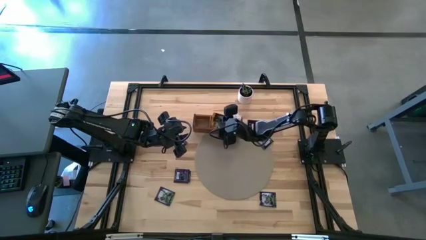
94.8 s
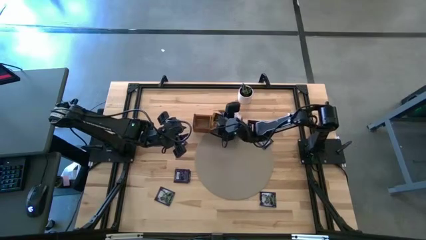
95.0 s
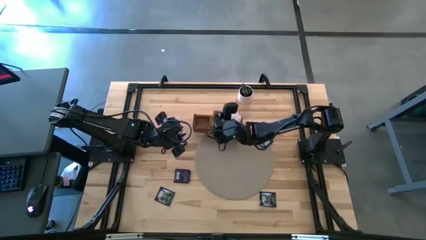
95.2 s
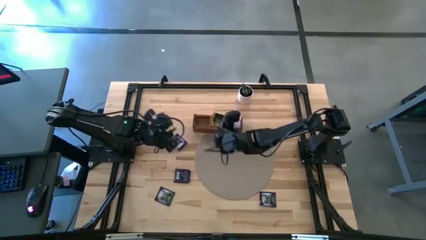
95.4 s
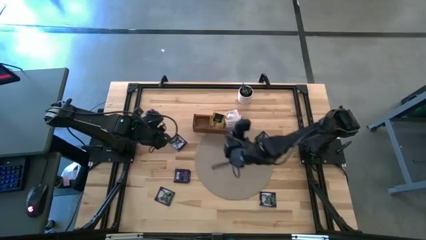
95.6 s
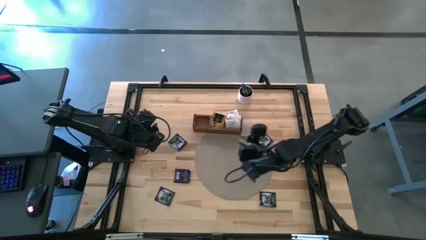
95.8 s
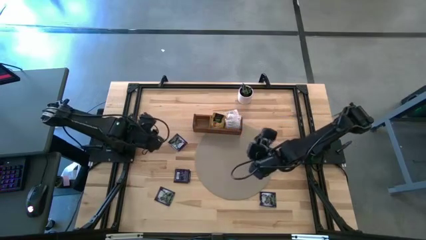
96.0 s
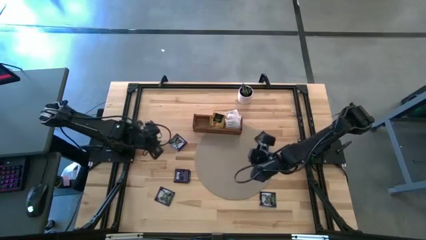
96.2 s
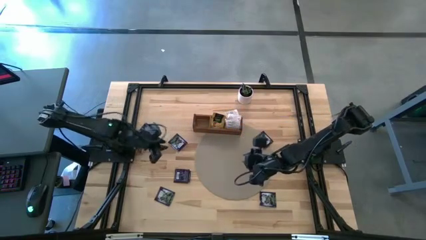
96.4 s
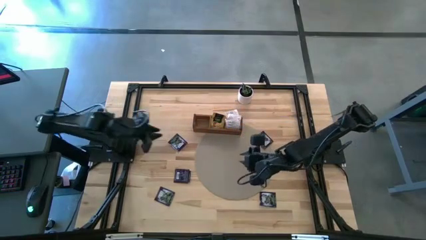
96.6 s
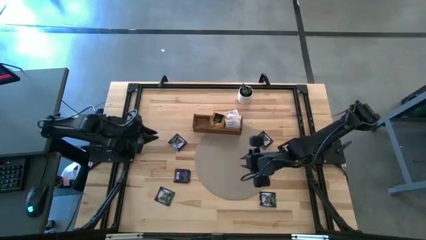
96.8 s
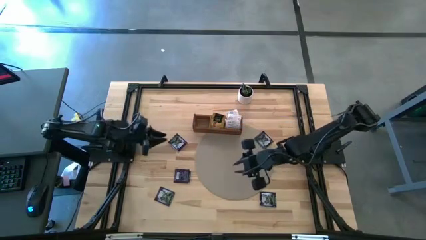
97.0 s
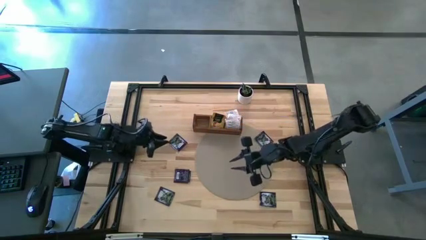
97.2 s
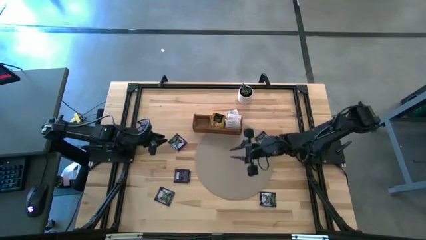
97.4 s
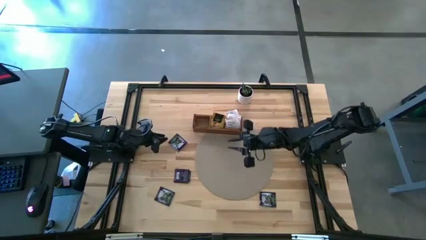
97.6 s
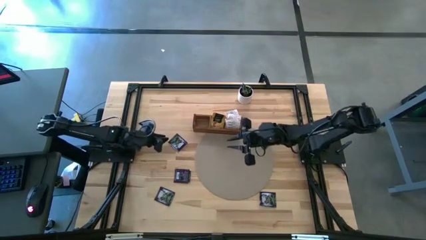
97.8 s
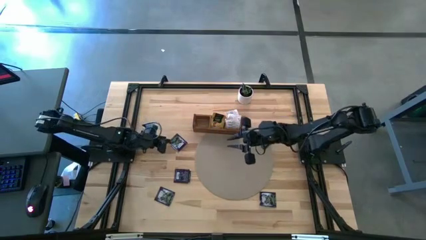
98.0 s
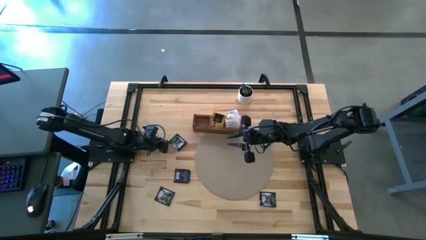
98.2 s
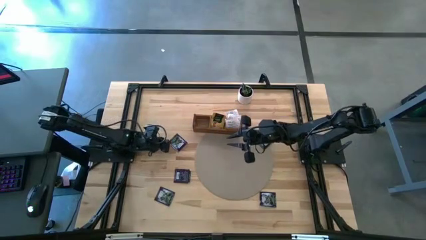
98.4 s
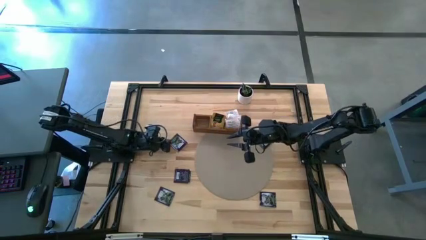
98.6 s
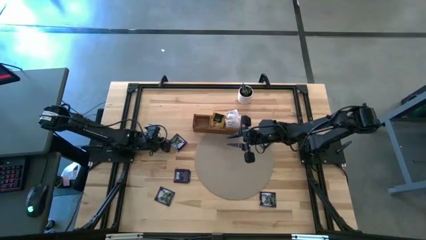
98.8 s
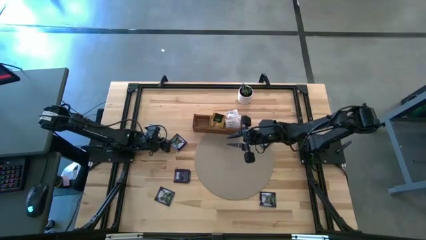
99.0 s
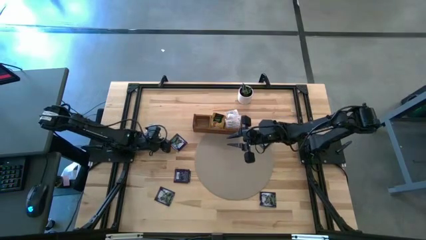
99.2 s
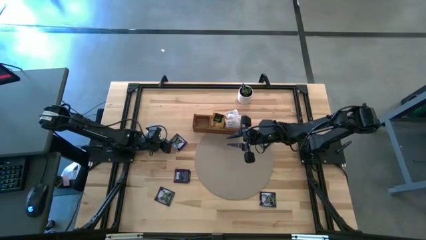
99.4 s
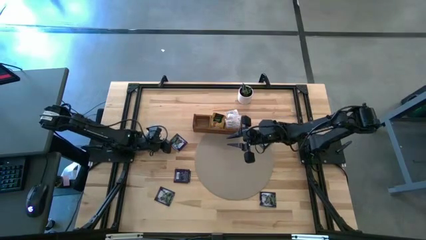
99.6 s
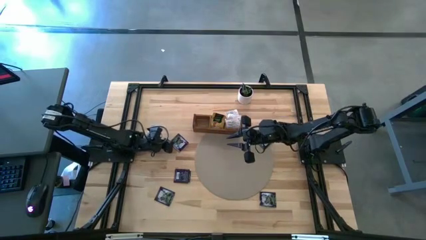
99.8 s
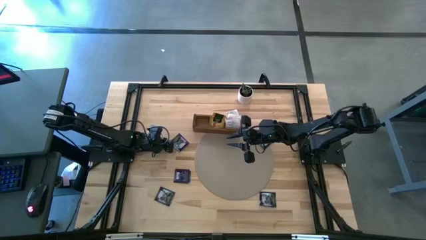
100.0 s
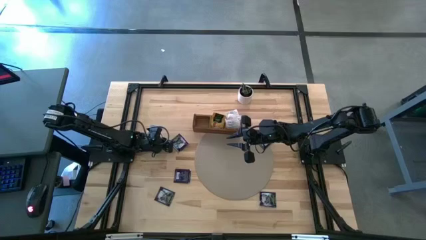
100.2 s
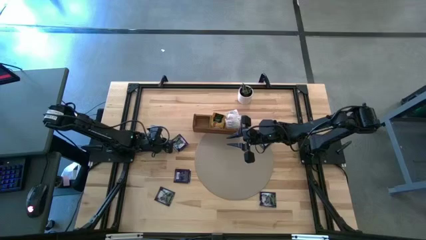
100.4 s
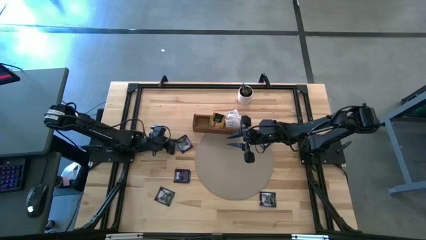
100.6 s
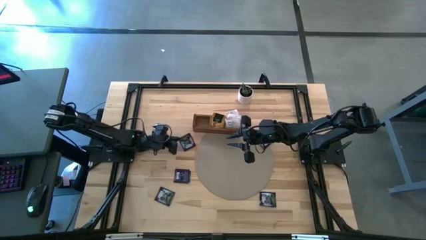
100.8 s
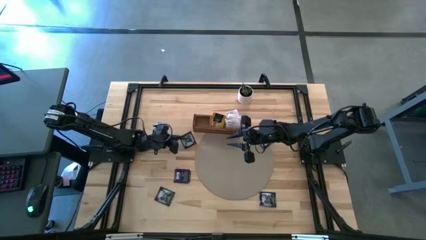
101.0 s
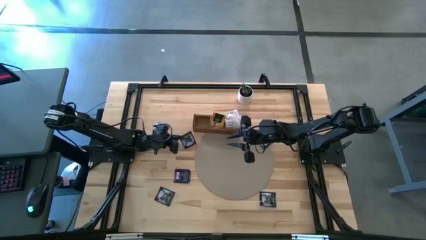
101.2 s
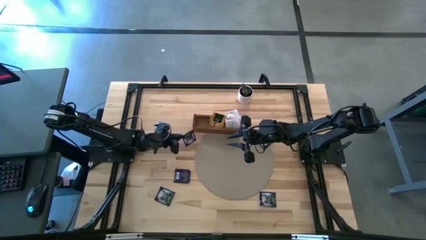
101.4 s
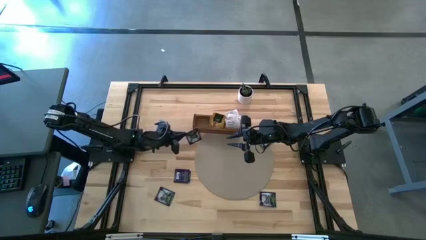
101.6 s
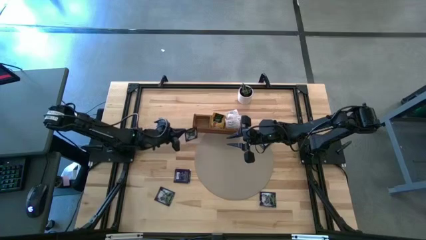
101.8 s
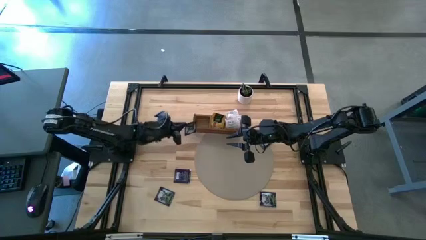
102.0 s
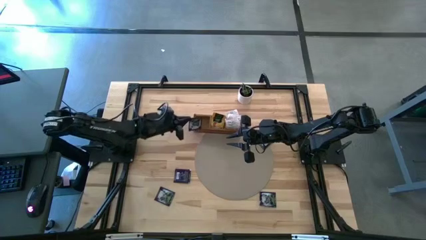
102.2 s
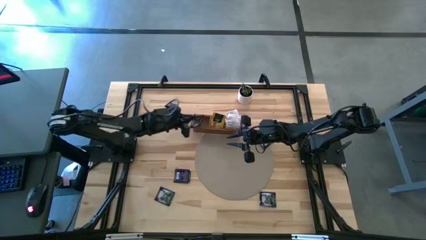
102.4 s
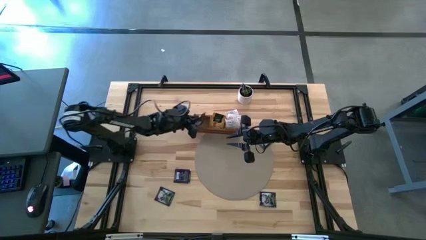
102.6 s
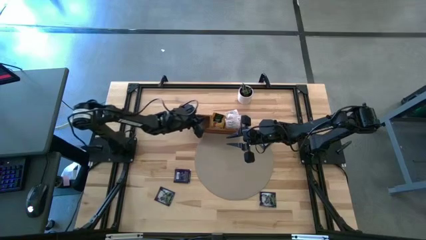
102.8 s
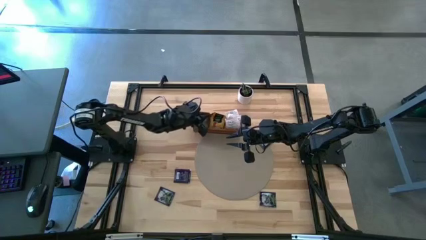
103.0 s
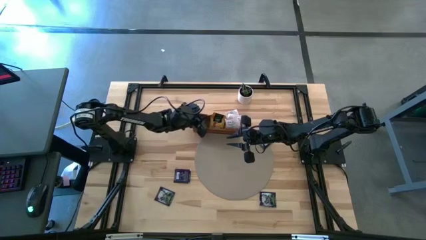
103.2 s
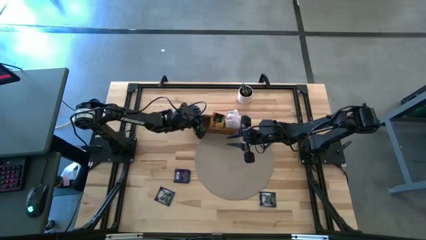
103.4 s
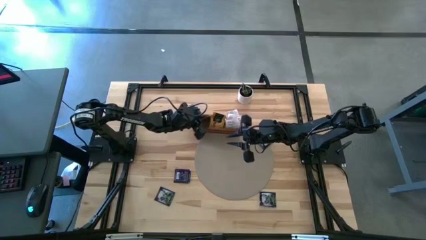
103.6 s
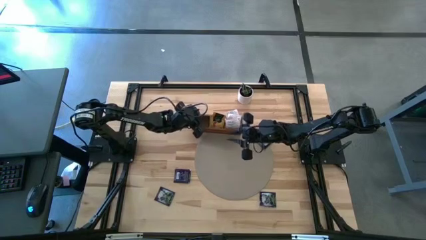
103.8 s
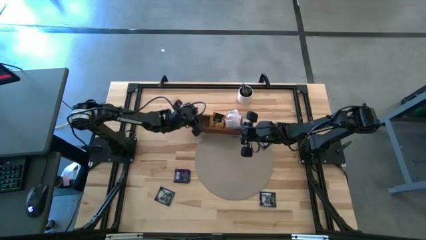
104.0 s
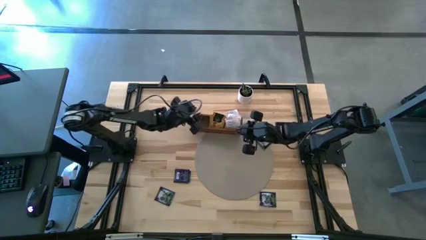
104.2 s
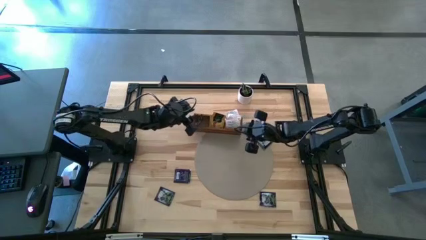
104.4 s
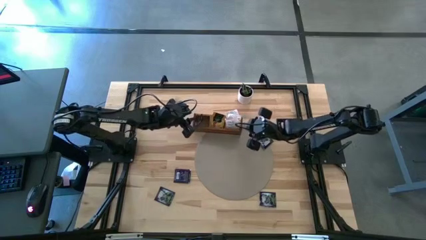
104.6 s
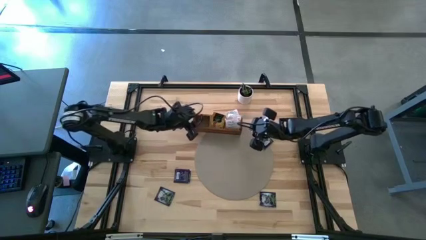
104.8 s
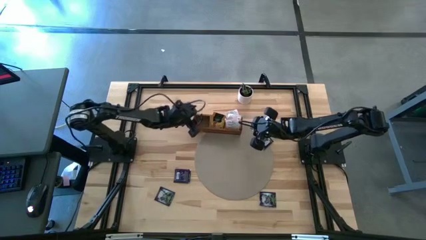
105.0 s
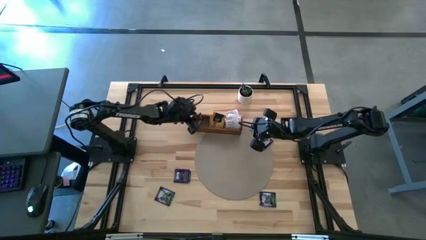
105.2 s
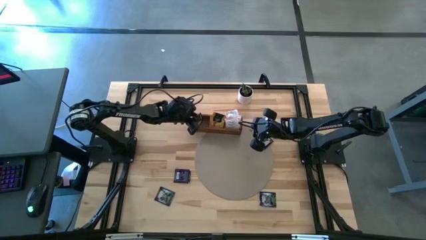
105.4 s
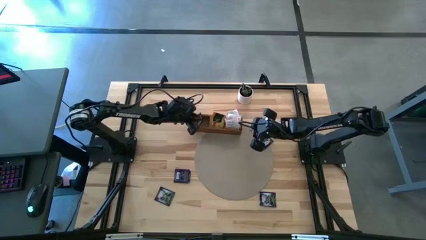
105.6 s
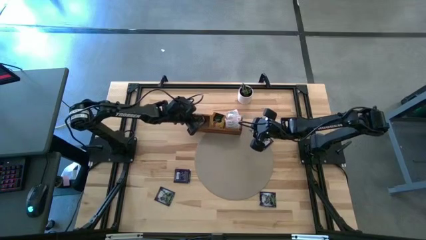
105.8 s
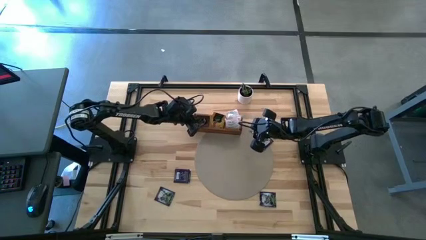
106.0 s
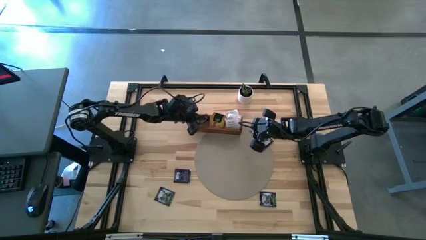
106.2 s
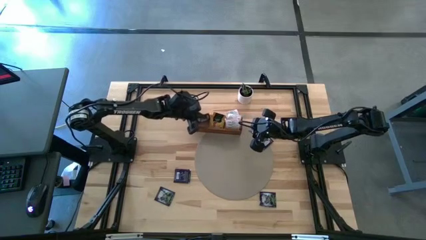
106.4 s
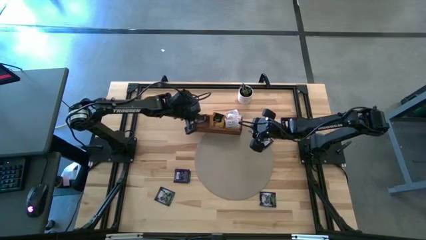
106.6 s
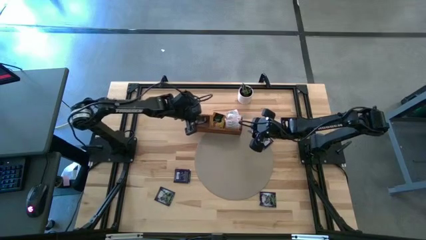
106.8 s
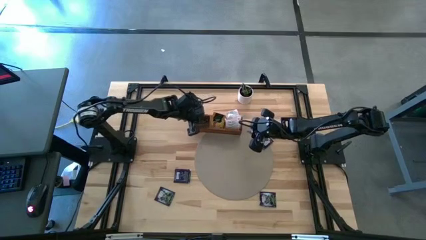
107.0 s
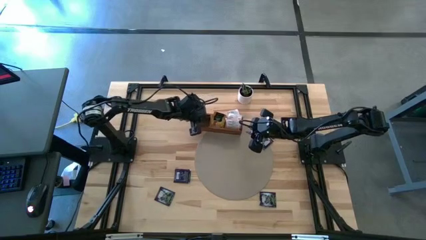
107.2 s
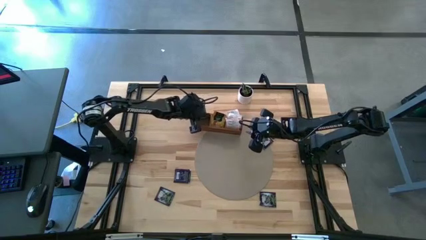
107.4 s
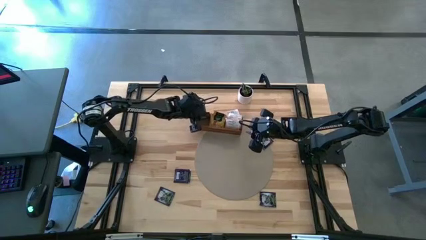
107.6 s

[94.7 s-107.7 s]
Task: Pick & Place Tea
Put the dark blue tea bag into the left section of the wooden organizer

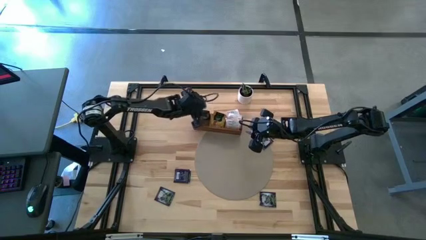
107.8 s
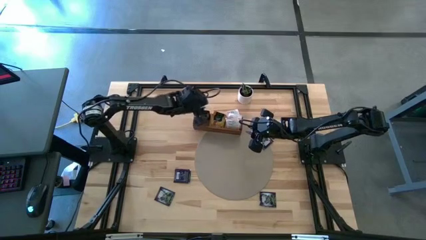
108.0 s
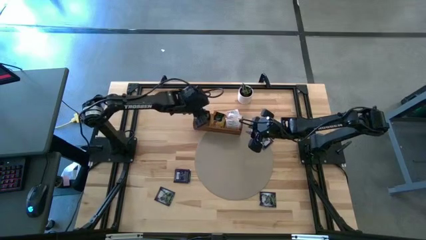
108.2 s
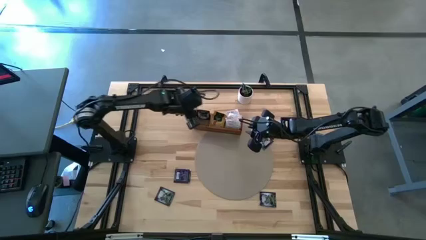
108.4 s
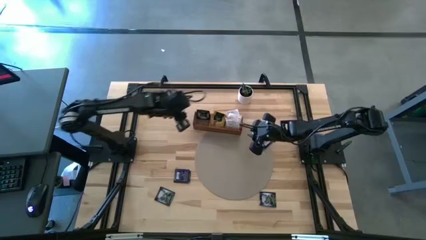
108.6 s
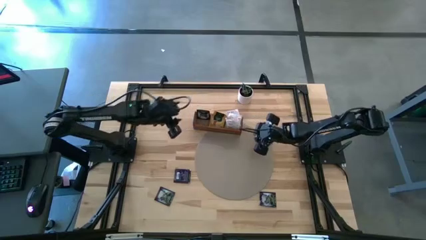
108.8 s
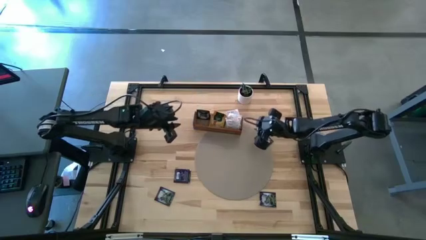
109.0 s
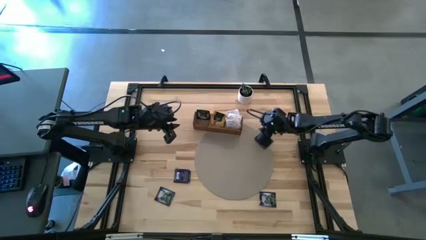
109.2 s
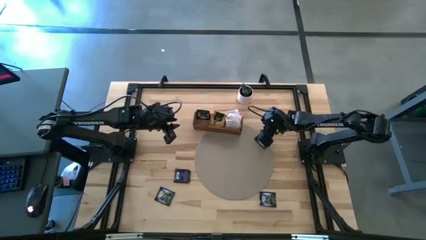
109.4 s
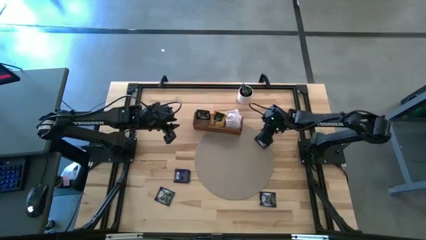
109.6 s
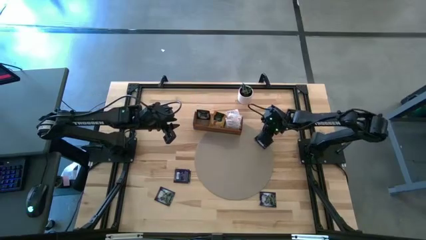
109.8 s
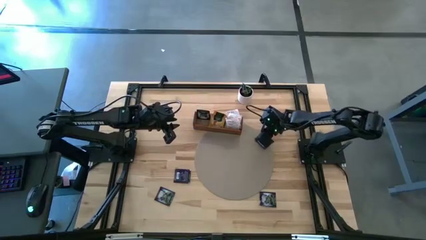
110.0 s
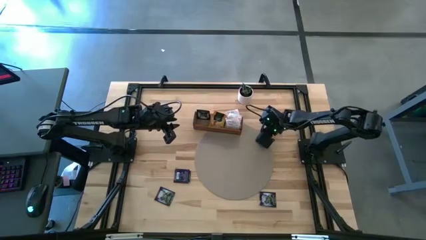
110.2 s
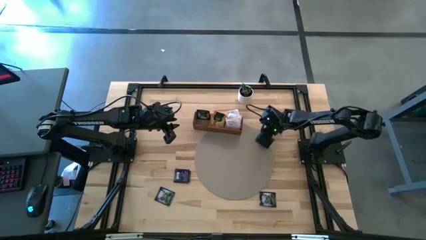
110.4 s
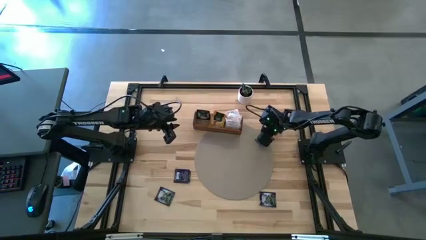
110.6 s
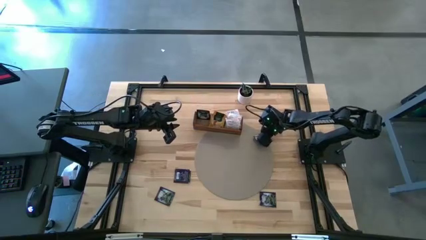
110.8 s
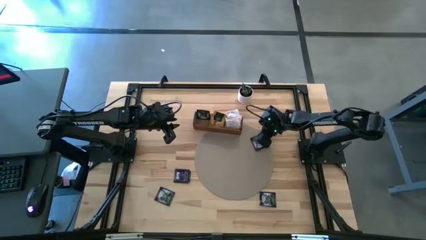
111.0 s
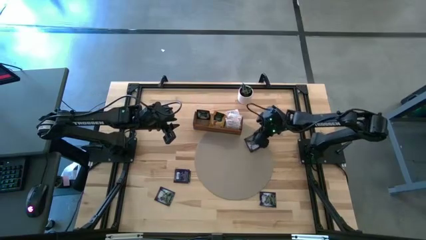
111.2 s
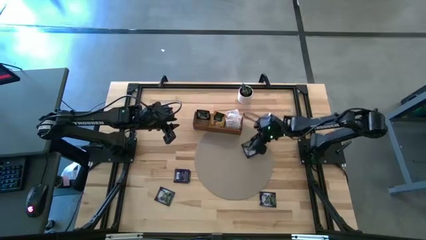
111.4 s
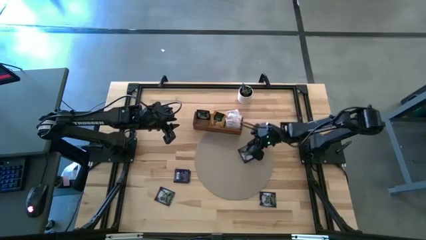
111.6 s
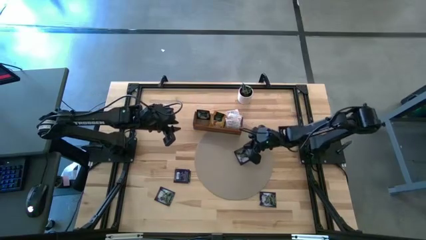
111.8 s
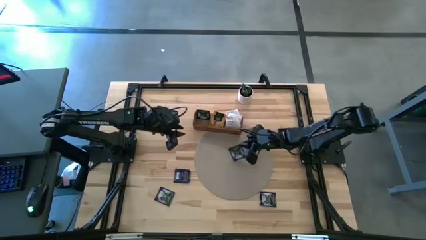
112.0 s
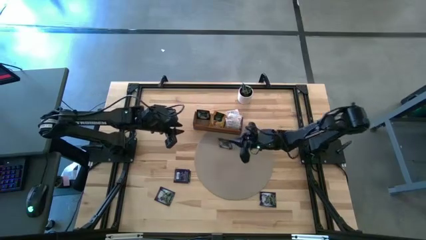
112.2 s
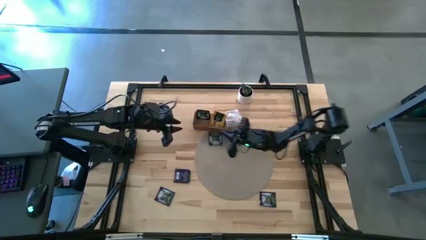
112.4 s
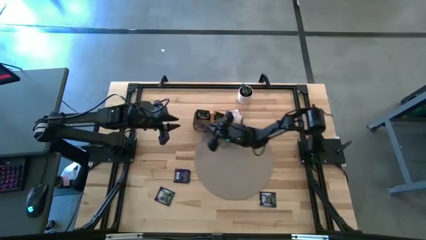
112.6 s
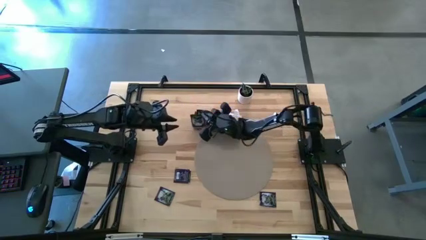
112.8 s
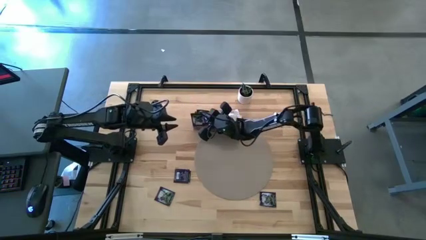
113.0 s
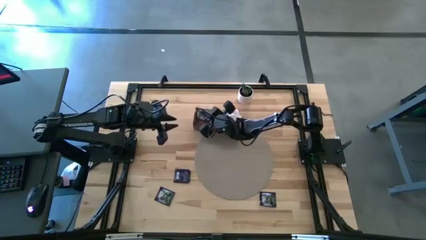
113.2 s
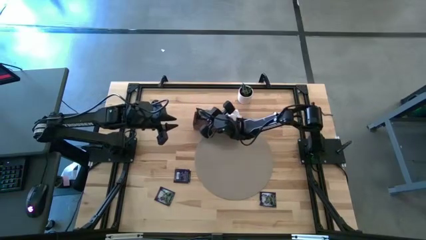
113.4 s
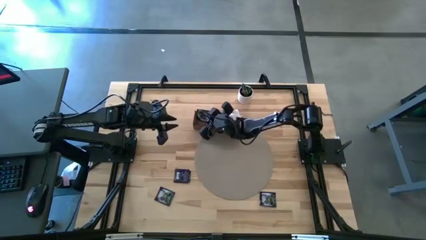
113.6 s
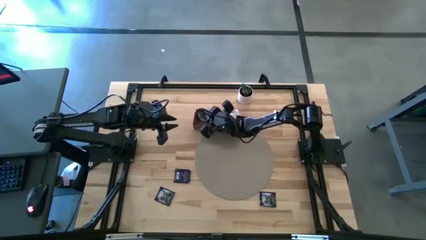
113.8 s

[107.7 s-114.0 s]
Put the dark blue tea bag into the left section of the wooden organizer
